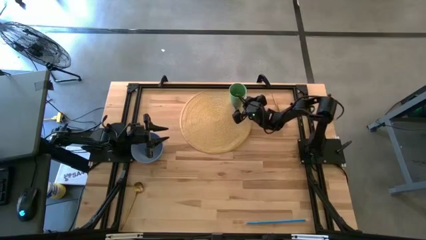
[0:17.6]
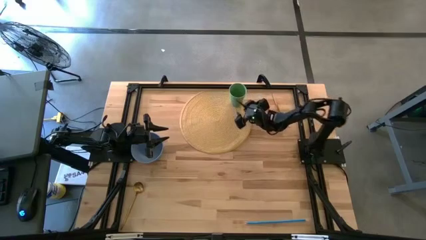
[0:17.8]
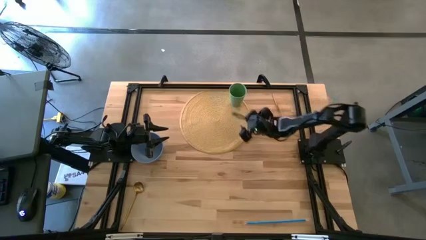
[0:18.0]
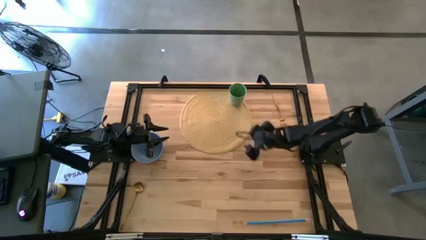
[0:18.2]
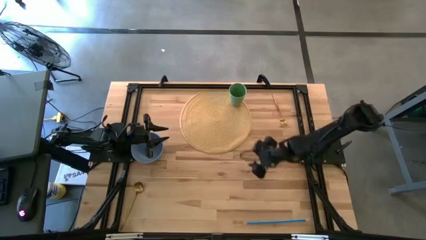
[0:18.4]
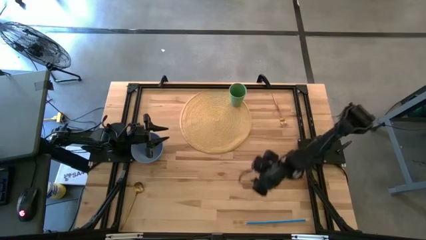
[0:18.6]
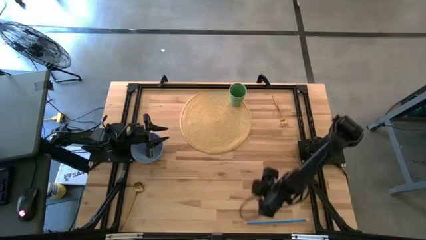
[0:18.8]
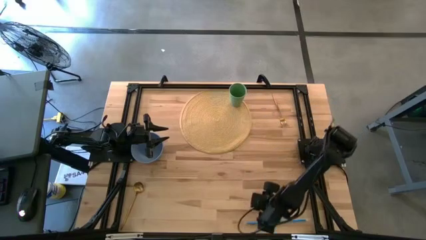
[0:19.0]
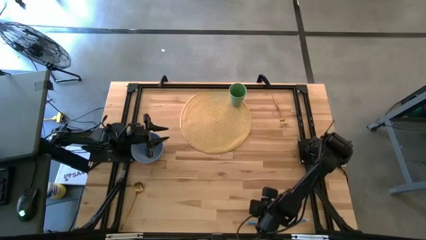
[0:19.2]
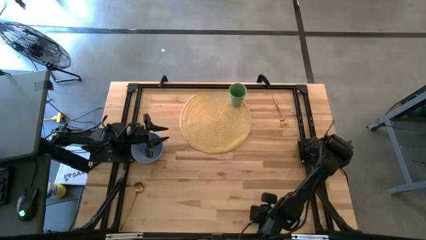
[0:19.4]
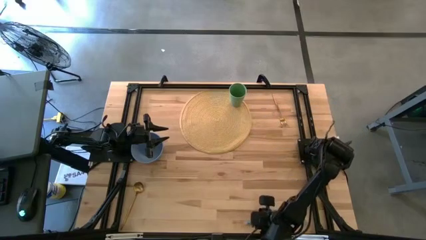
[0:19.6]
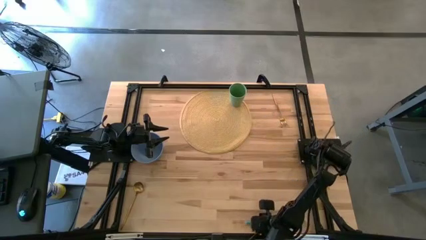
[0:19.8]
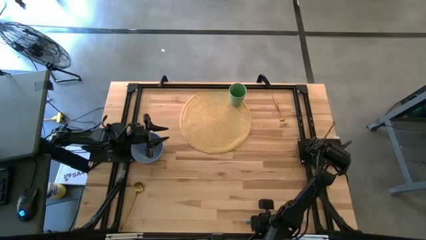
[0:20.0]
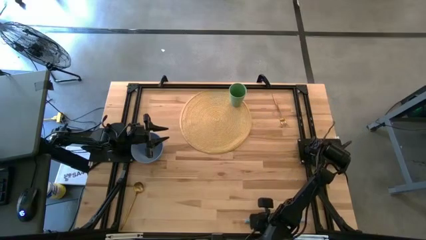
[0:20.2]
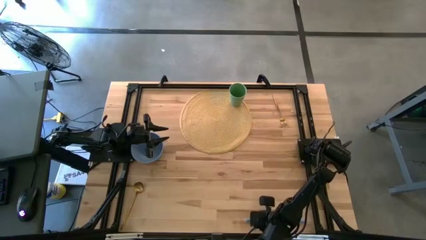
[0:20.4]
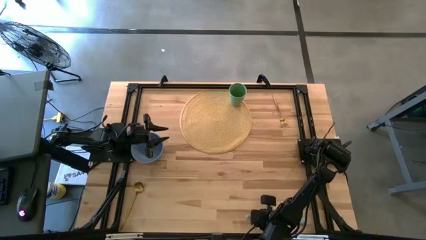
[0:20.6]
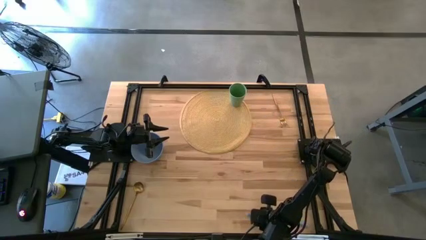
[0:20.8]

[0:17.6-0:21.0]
Task: Pick & Place Utensil
Put the blue straw into the green cup on the brown mat

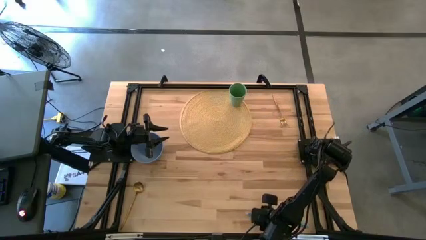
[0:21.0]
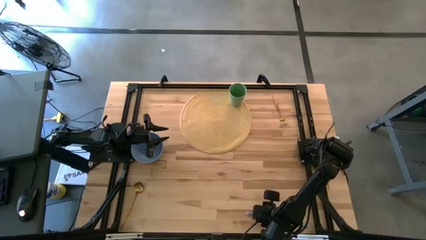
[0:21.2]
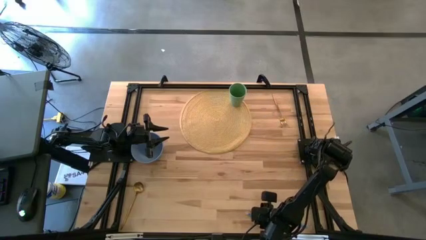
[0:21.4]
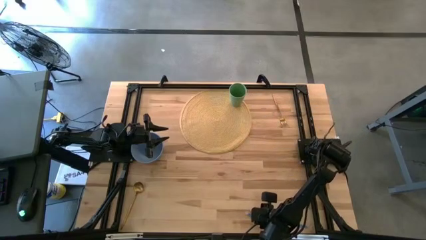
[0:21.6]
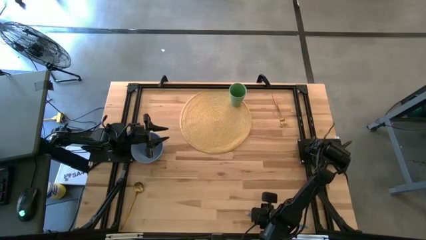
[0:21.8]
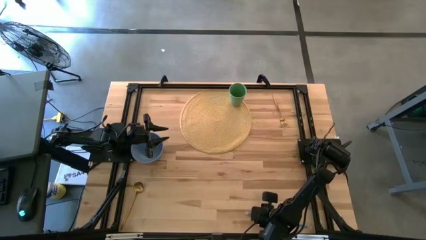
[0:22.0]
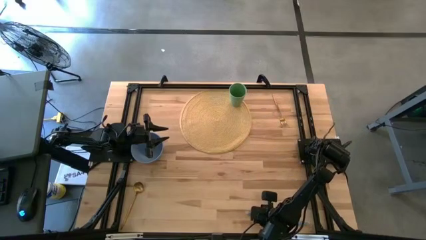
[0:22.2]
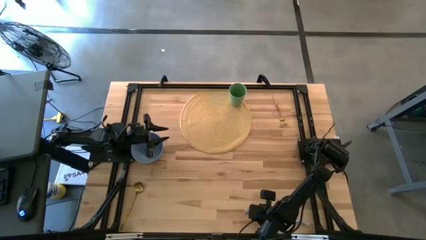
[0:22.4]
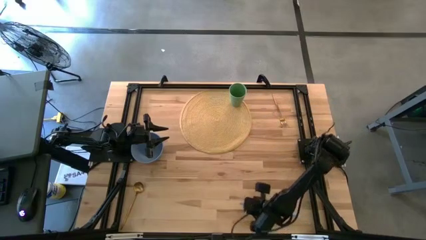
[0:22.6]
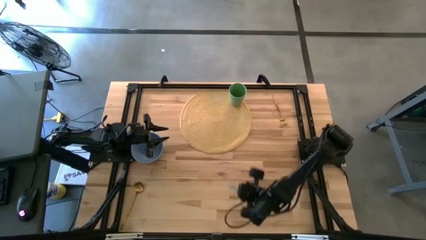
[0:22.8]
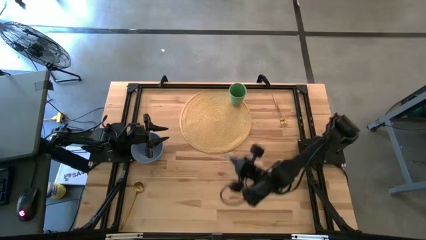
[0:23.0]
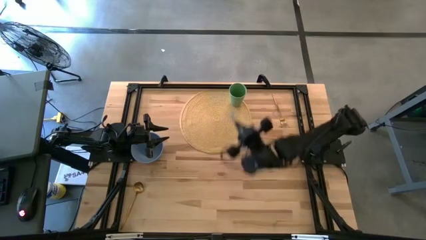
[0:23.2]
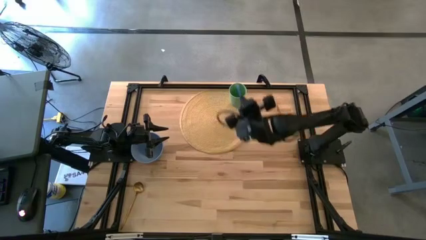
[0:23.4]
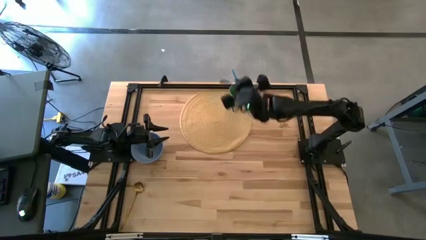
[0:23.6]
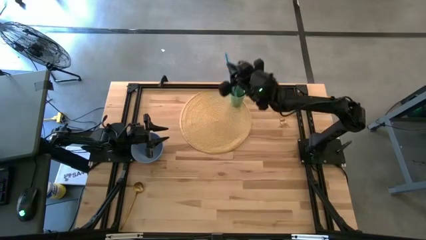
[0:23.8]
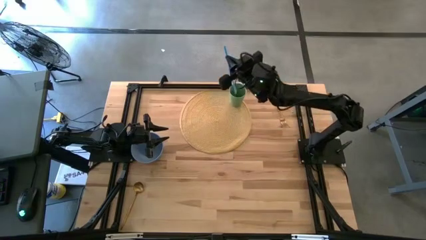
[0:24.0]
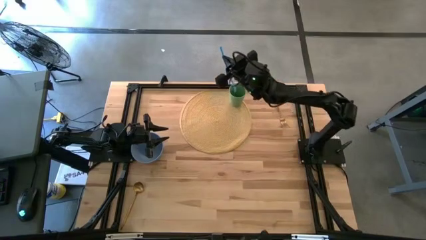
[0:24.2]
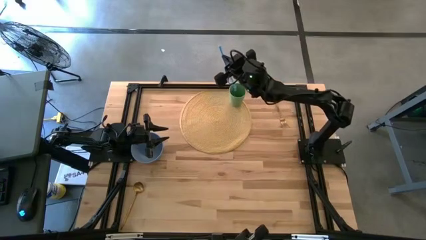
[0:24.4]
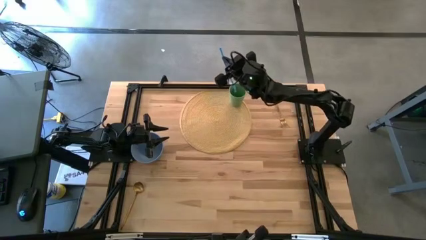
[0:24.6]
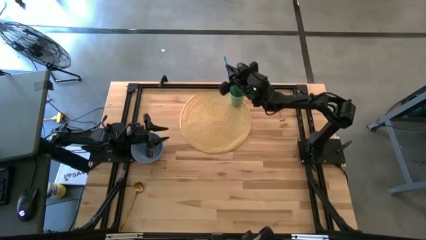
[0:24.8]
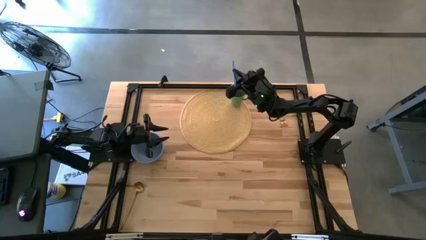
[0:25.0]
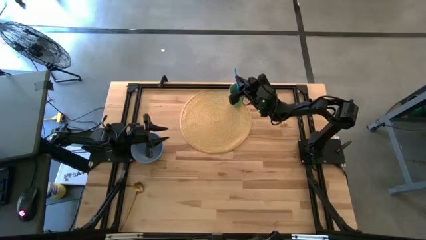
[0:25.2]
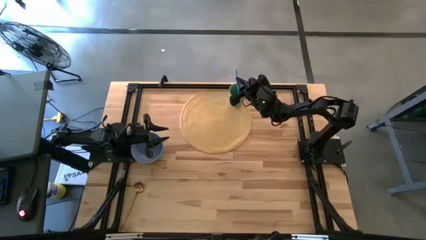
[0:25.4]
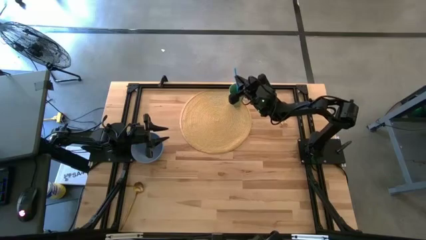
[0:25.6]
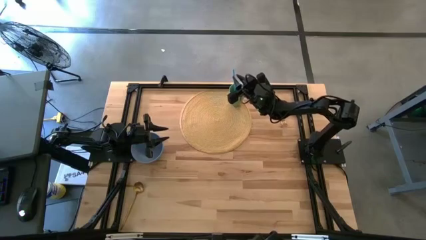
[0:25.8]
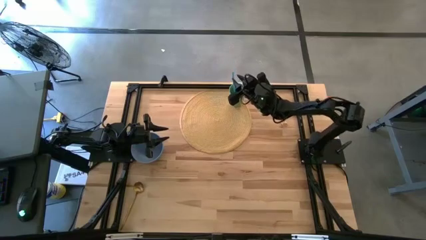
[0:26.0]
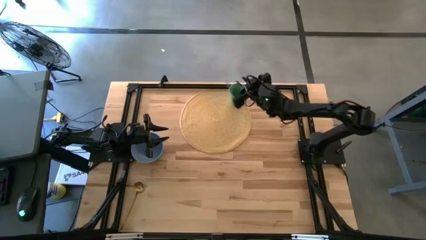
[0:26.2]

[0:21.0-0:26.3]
Put the blue straw into the green cup on the brown mat

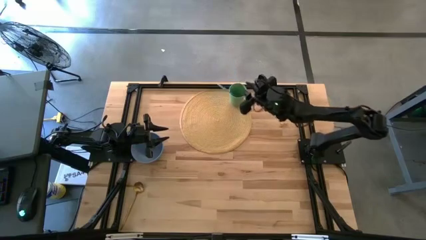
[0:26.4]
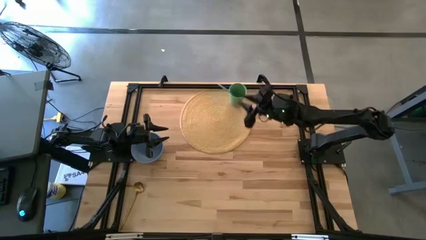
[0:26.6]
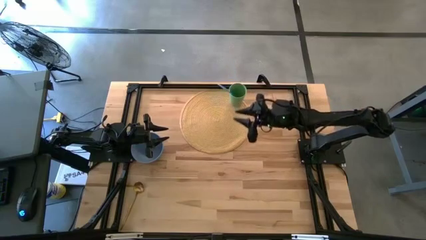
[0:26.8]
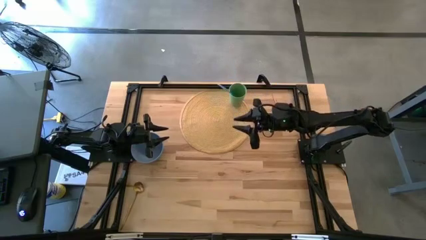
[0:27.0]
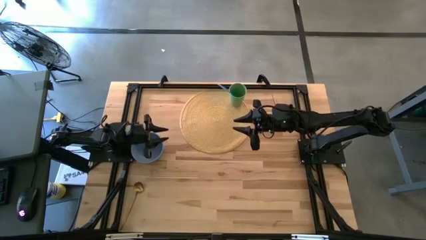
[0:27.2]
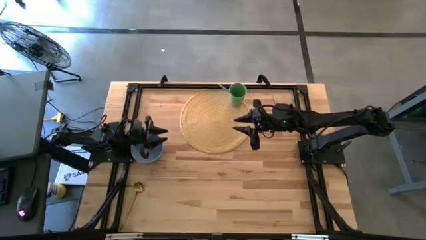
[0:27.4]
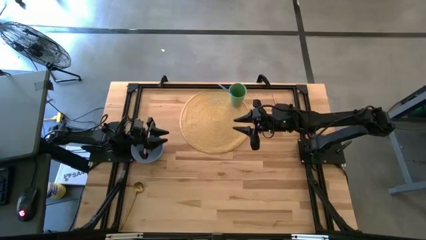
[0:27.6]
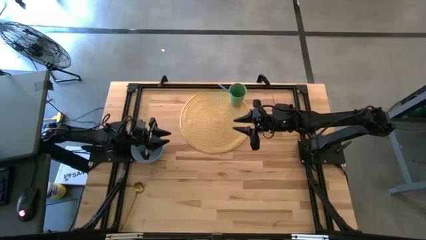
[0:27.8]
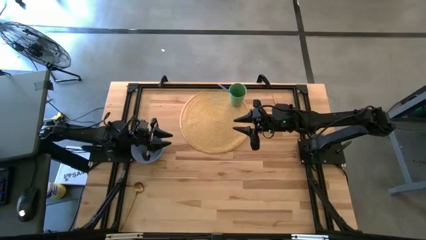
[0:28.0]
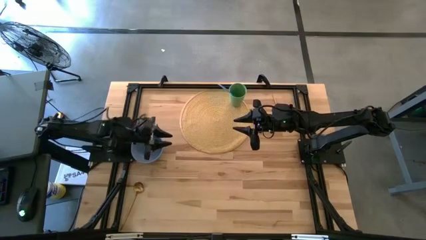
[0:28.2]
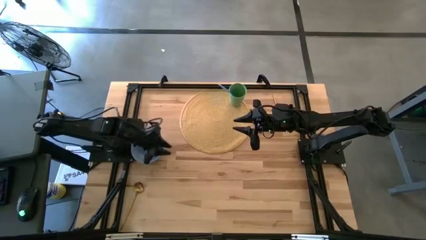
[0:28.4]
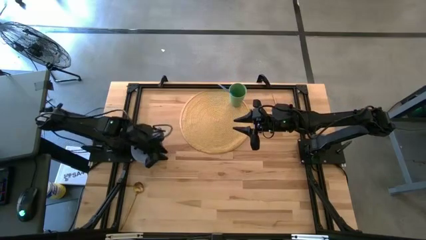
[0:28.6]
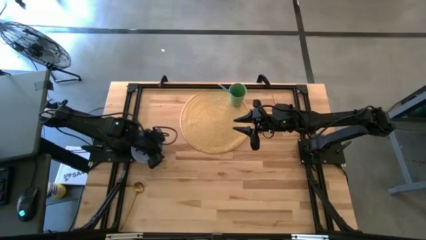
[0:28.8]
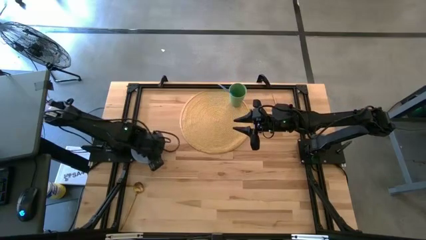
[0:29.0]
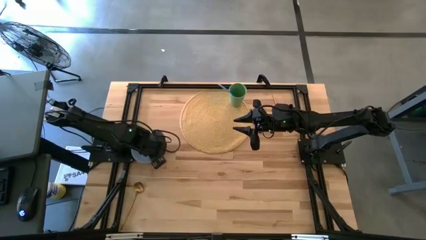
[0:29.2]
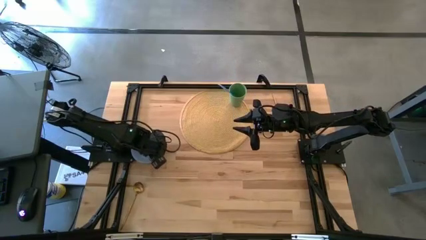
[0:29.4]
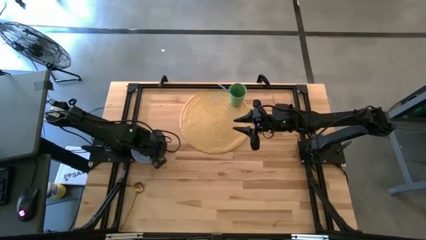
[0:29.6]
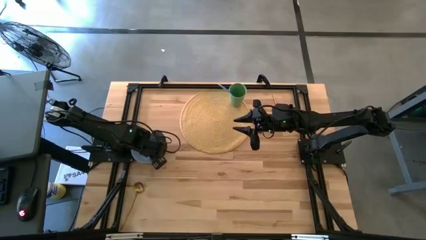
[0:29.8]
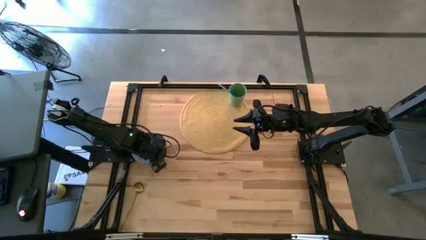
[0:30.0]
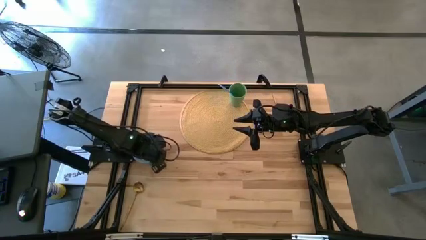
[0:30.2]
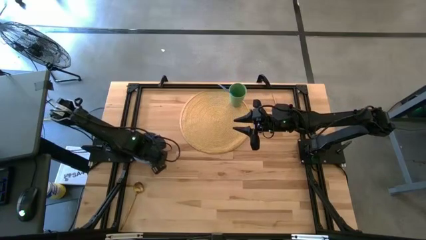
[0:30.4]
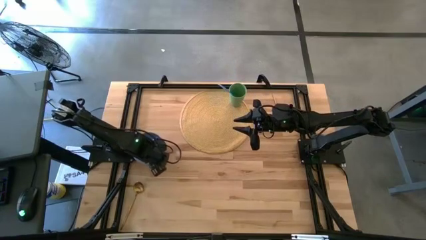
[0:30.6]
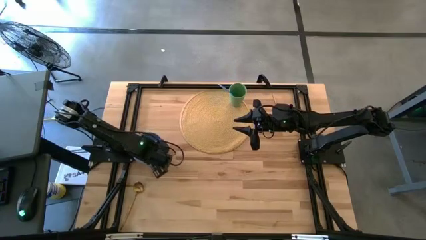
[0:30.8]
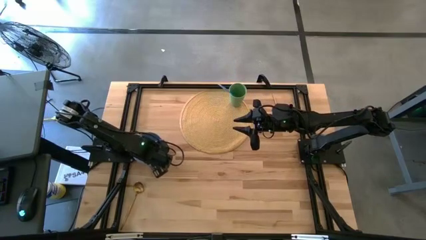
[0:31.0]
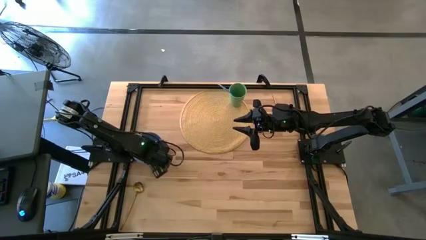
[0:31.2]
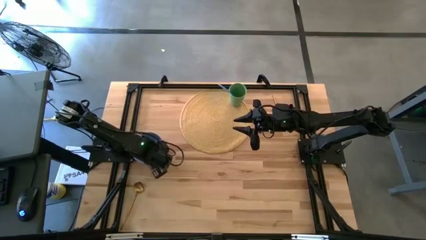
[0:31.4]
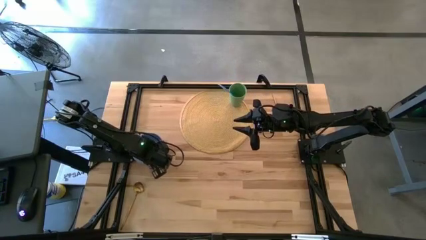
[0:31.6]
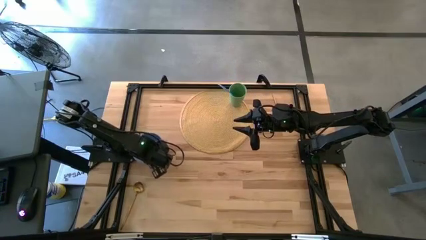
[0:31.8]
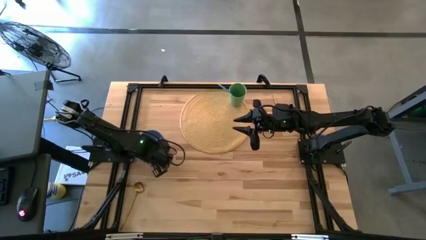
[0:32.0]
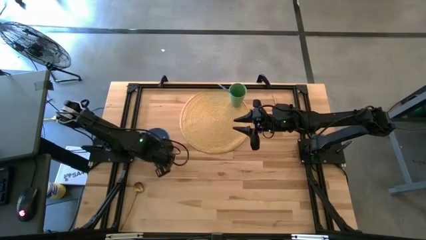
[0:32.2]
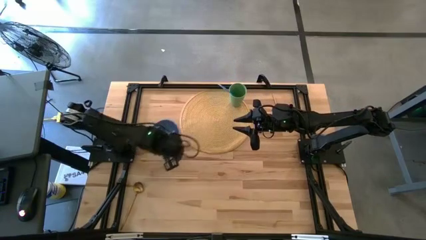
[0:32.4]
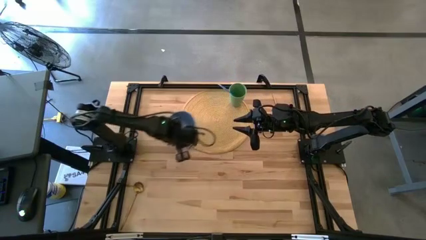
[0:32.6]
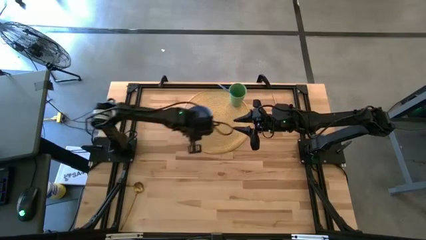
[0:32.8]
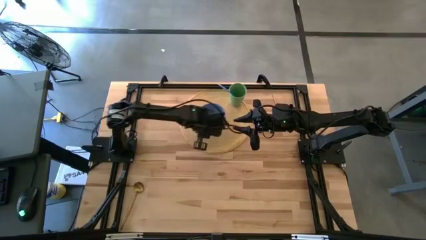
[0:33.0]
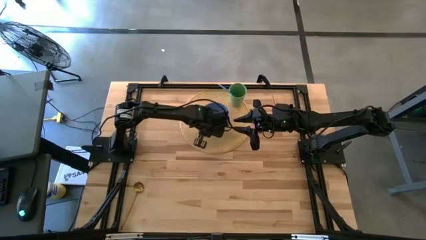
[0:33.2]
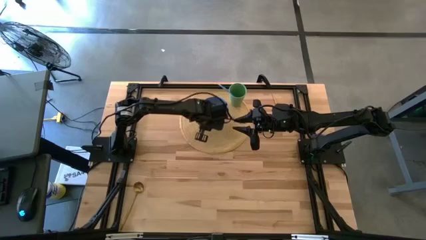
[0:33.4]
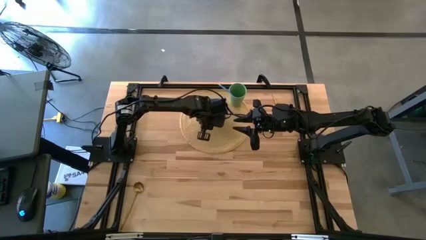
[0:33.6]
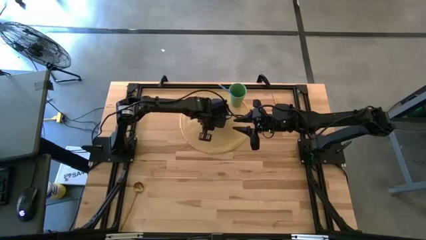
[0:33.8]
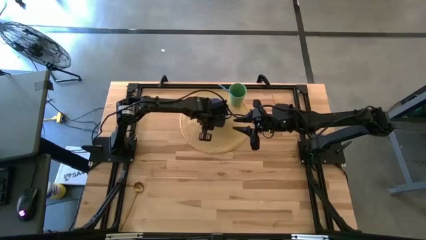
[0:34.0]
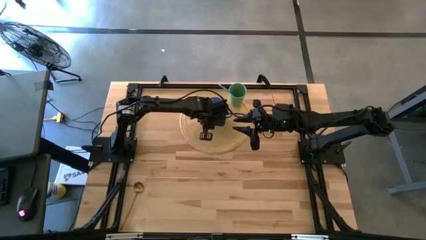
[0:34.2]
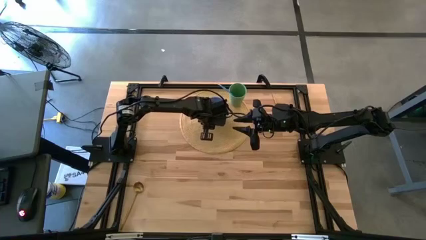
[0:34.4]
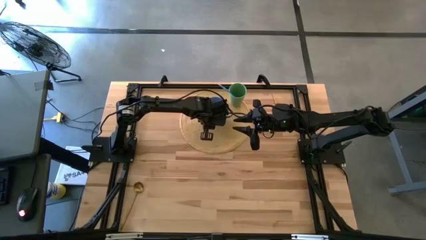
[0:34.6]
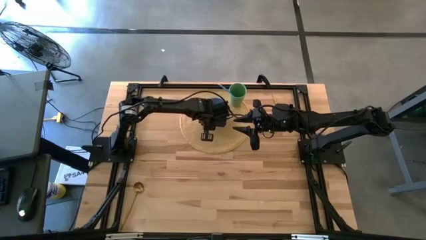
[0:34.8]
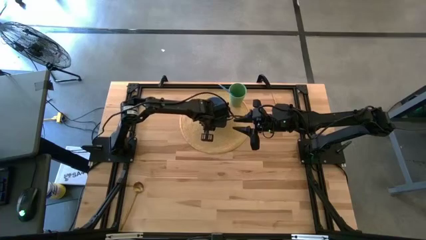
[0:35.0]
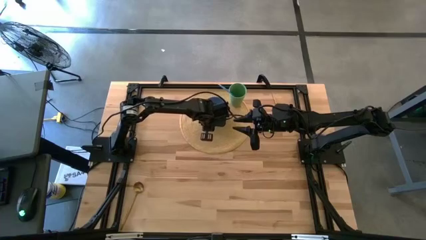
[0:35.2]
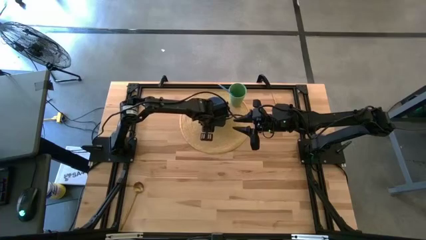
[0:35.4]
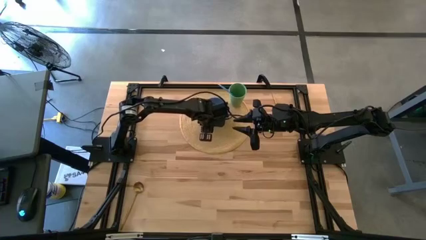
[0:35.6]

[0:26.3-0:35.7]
Put the blue bowl on the brown mat to the bottom left of the green cup
